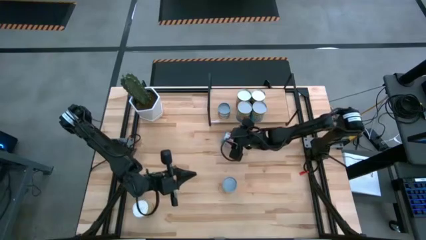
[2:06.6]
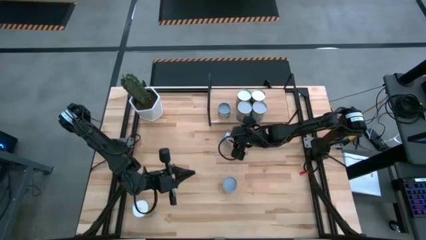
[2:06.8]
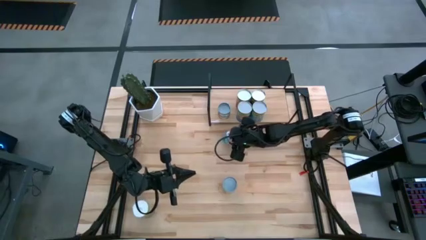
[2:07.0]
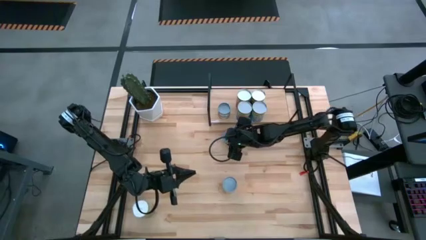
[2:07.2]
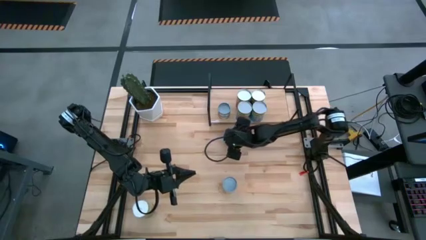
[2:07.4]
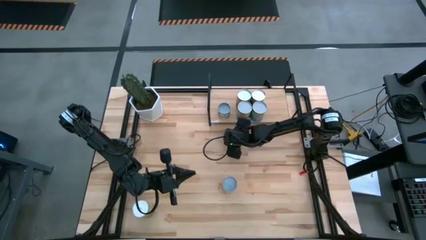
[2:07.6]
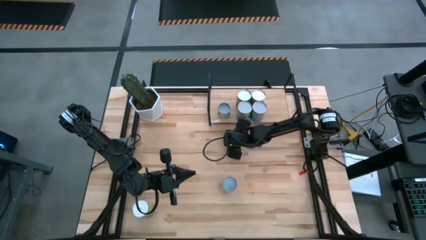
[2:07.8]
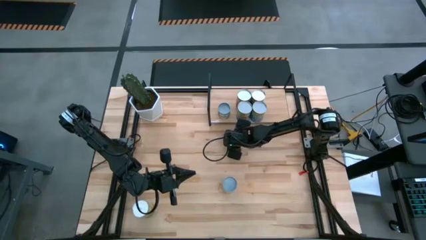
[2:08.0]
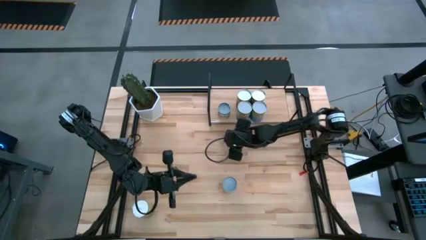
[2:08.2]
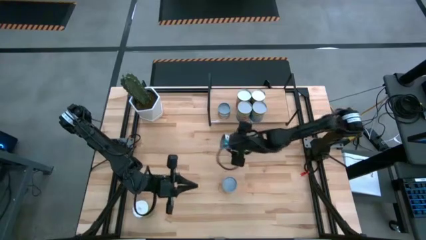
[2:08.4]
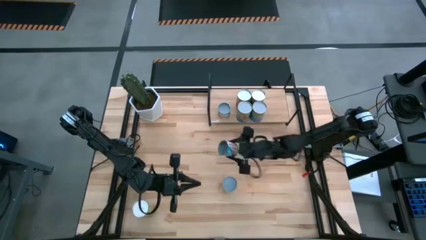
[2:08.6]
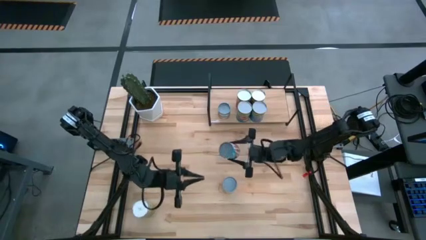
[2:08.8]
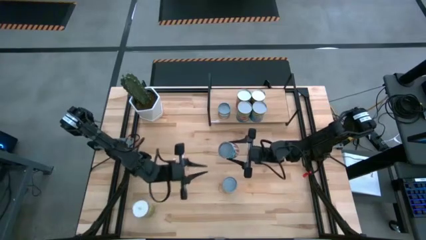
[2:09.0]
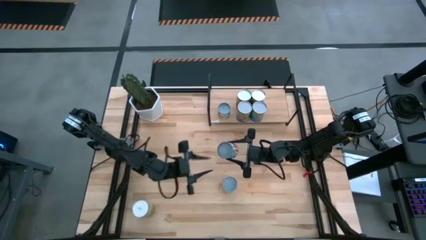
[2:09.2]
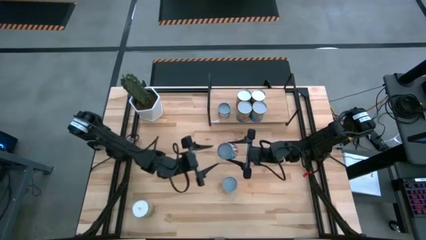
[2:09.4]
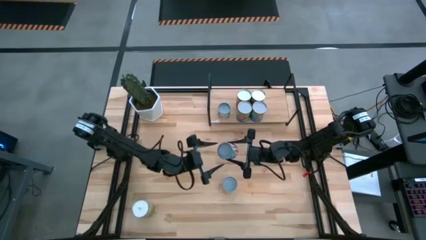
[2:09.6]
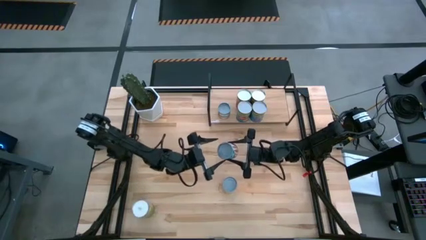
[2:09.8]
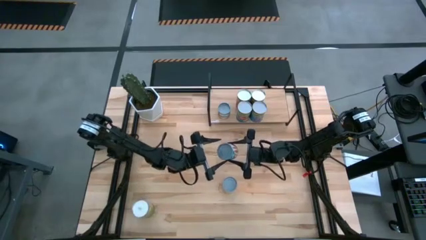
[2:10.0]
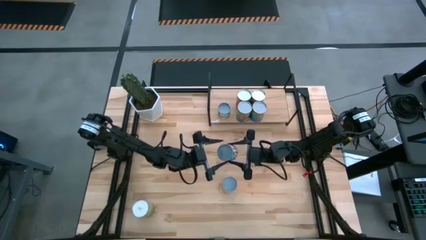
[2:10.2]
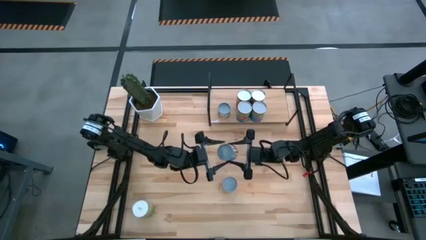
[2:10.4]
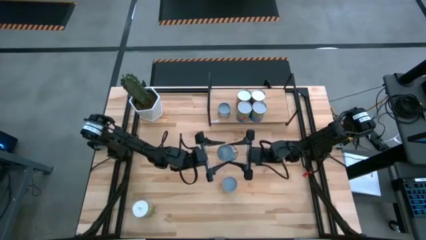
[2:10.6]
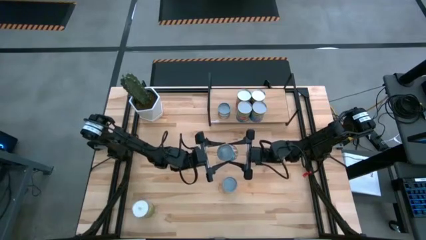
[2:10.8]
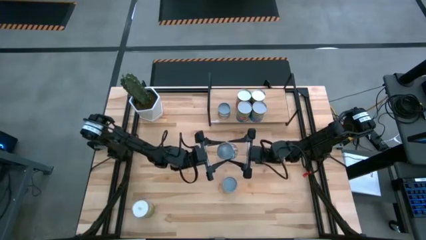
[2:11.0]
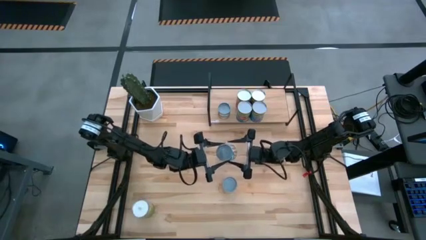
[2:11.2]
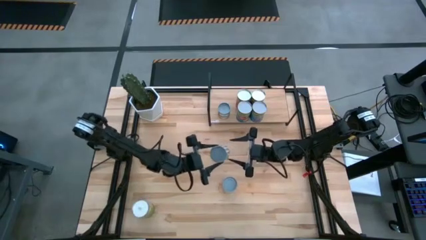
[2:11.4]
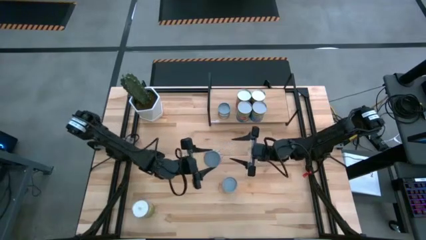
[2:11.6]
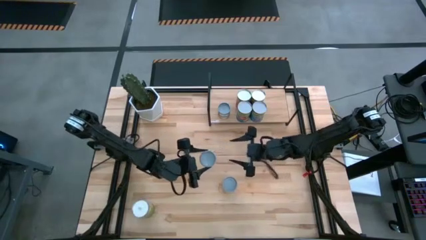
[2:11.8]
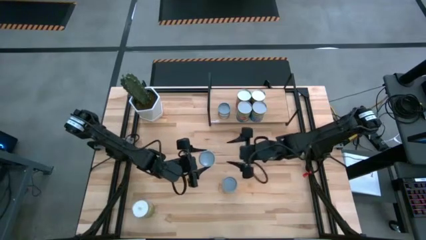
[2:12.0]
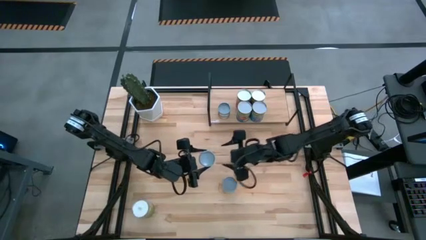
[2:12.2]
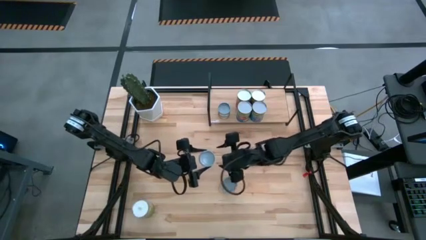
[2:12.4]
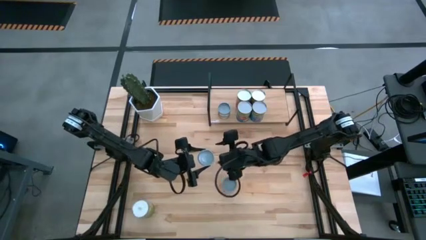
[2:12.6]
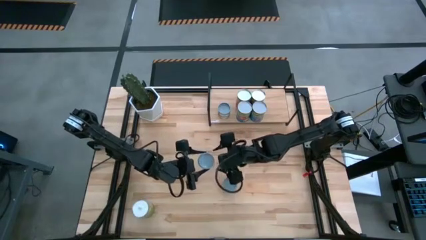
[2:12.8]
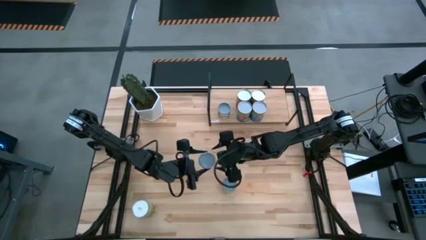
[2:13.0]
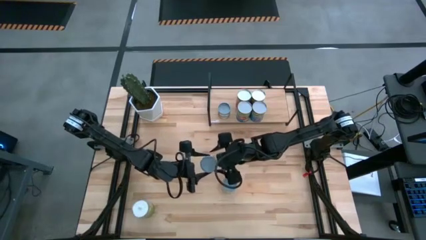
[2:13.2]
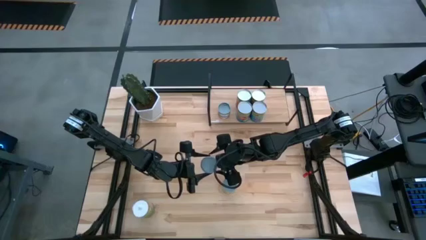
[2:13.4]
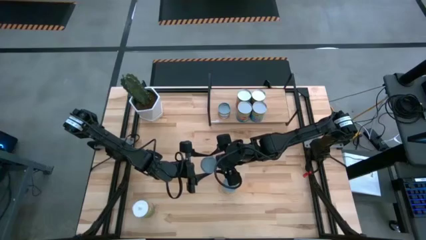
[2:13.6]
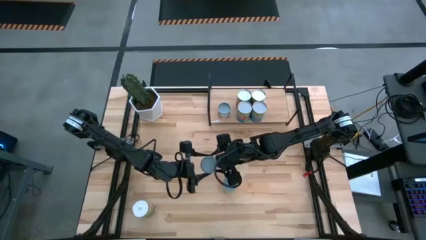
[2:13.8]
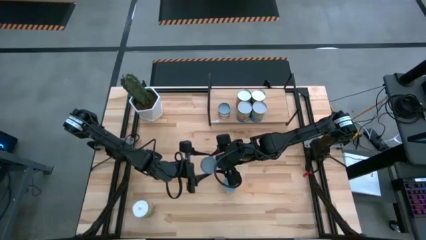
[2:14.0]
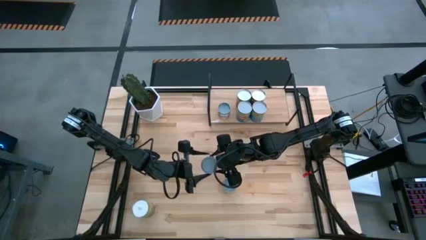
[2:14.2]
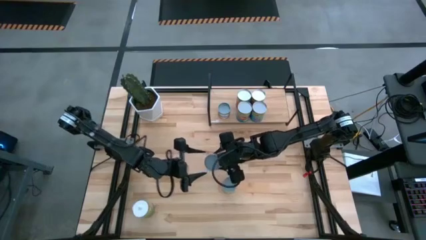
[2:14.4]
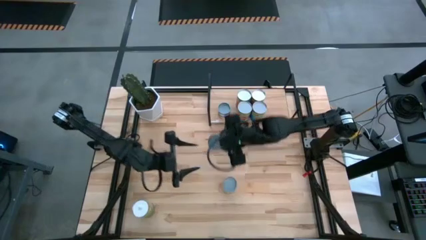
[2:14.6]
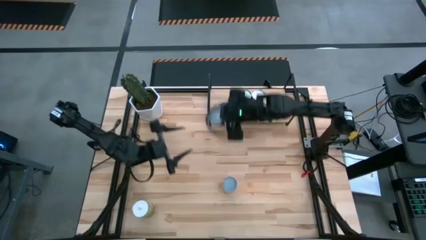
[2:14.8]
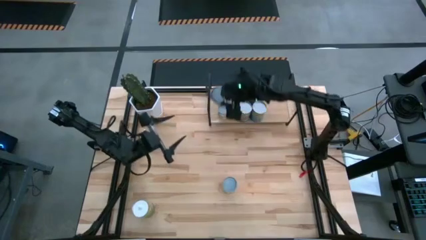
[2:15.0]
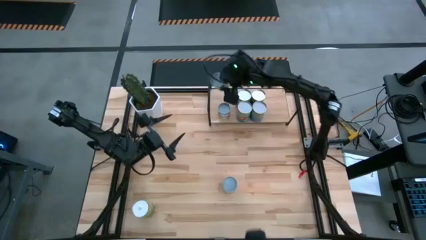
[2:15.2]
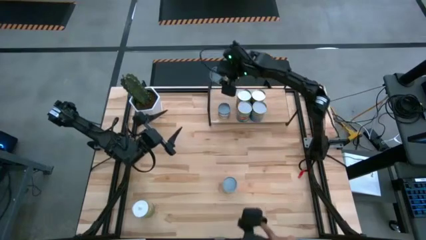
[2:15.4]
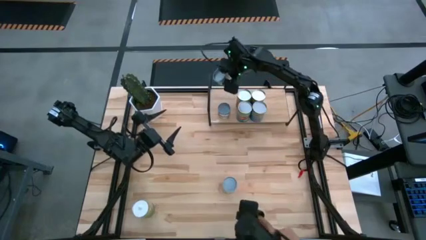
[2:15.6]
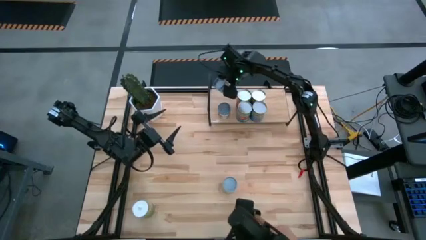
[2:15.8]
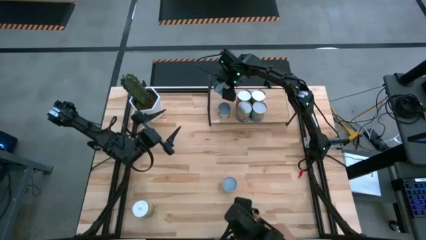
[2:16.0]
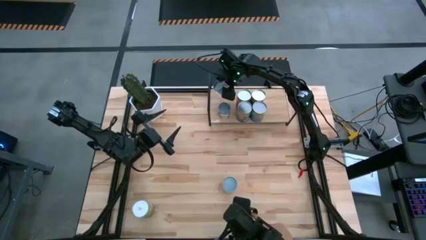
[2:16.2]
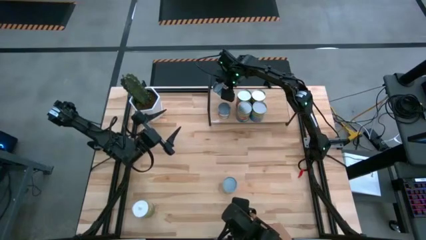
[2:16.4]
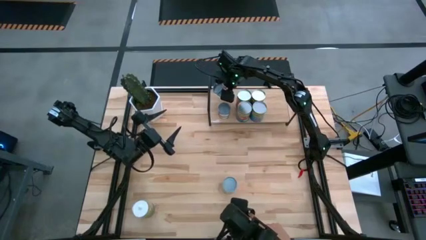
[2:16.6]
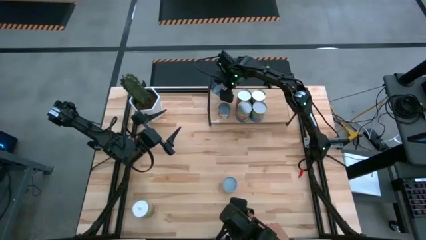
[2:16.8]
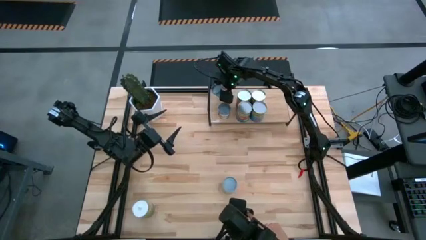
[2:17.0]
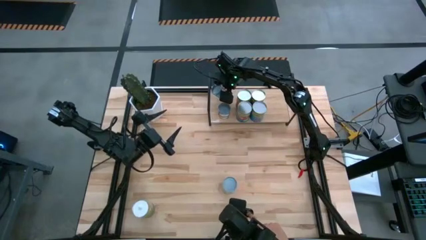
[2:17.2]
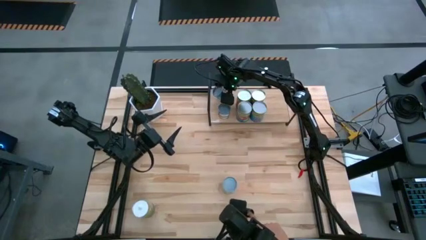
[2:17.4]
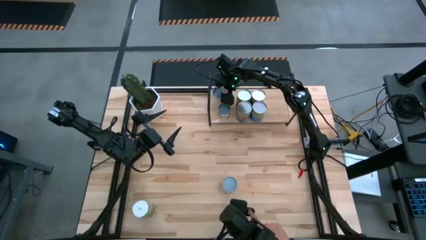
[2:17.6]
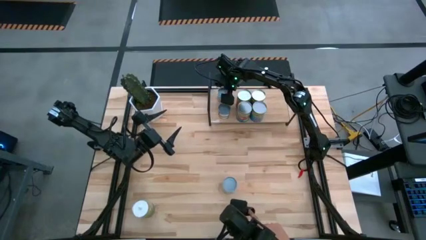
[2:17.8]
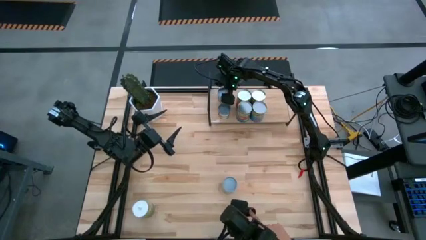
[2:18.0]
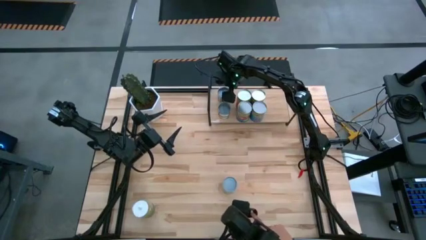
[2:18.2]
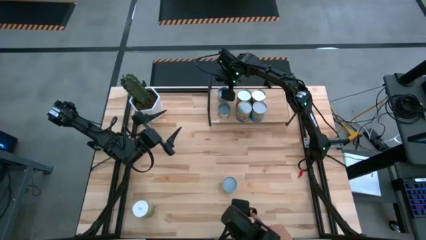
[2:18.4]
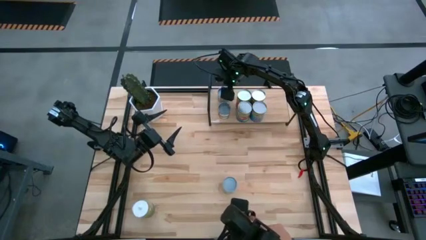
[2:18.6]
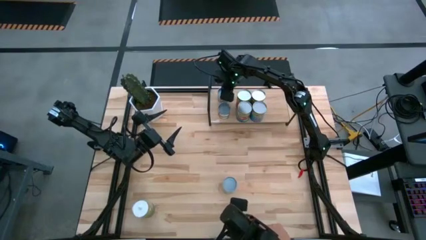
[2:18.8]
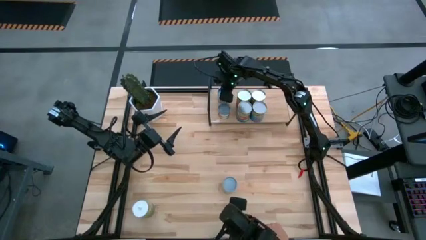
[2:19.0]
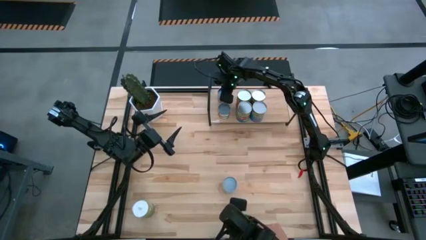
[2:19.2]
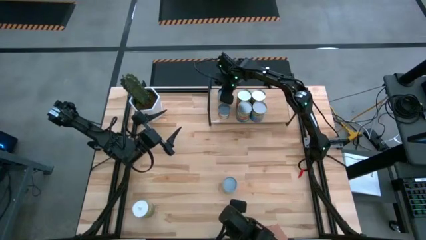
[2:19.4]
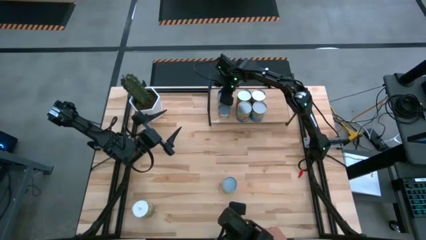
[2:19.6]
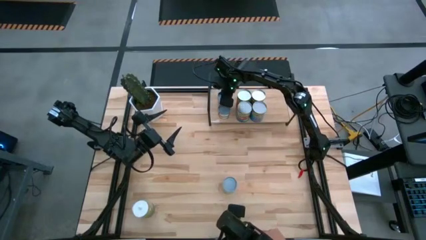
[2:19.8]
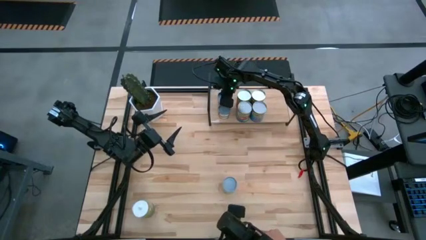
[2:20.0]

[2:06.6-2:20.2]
Task: Pick and place cans onto a shelf
Put the canned carrots on the shelf
